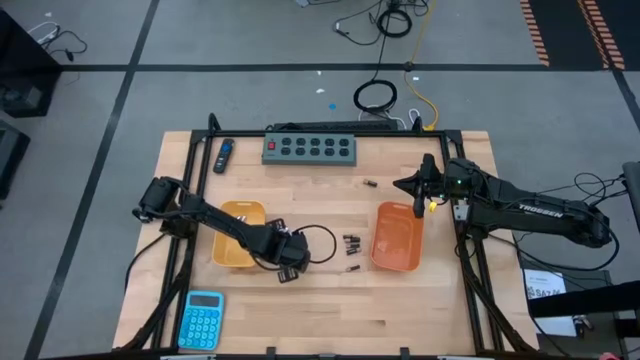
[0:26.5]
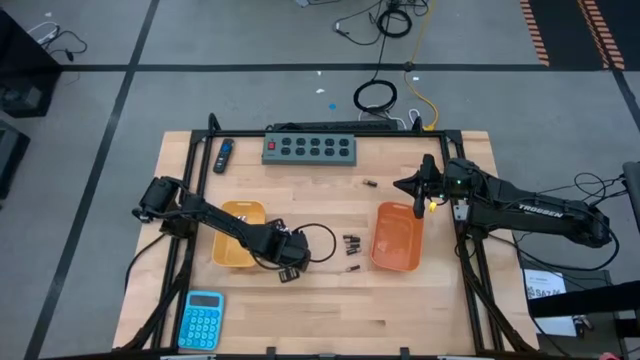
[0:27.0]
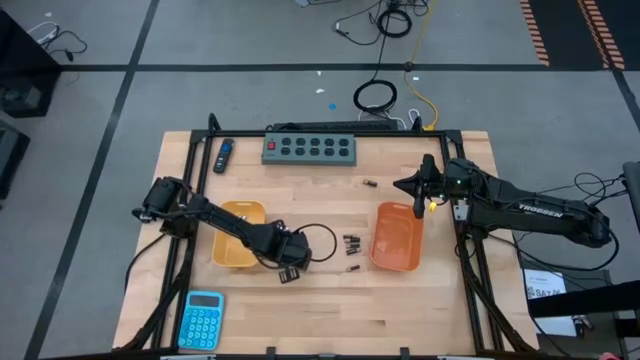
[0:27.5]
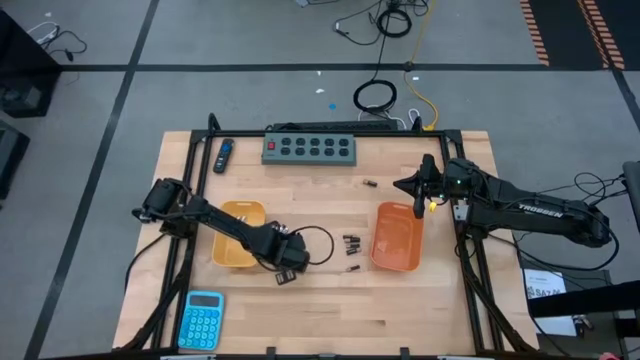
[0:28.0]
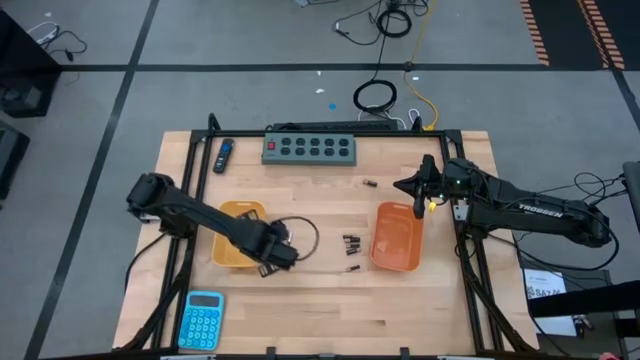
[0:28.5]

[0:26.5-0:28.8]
Task: Sort batteries
Put the silver battery into the yellow bin

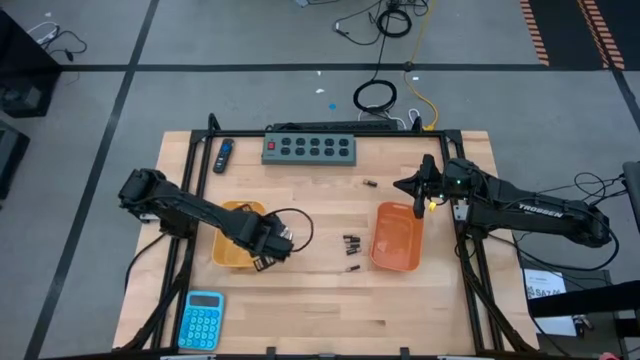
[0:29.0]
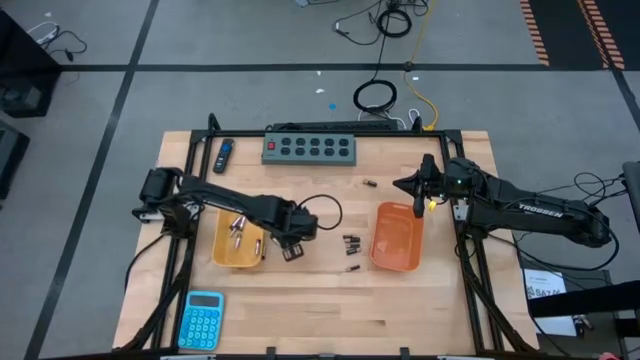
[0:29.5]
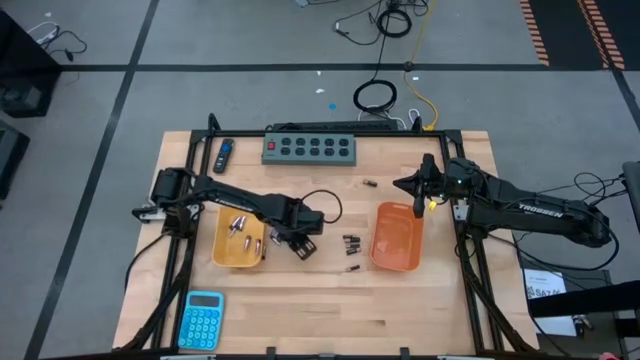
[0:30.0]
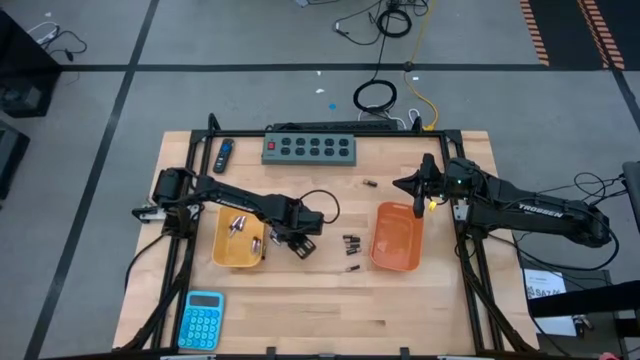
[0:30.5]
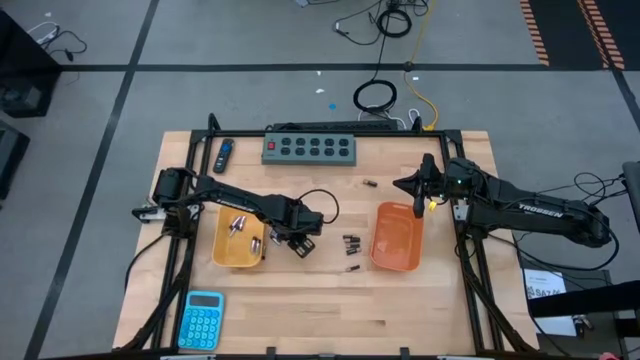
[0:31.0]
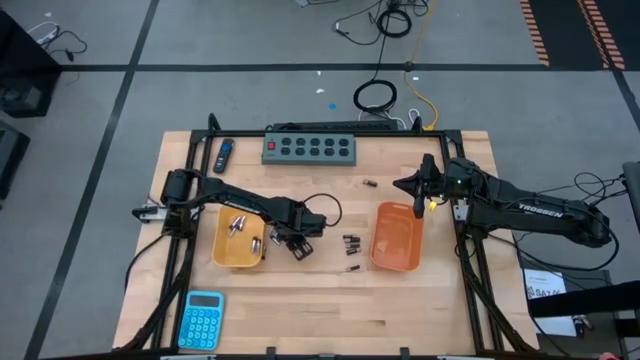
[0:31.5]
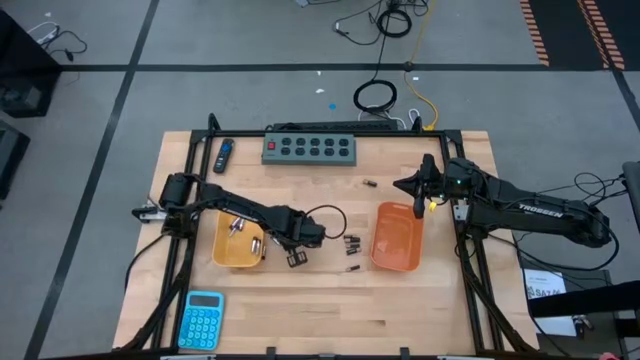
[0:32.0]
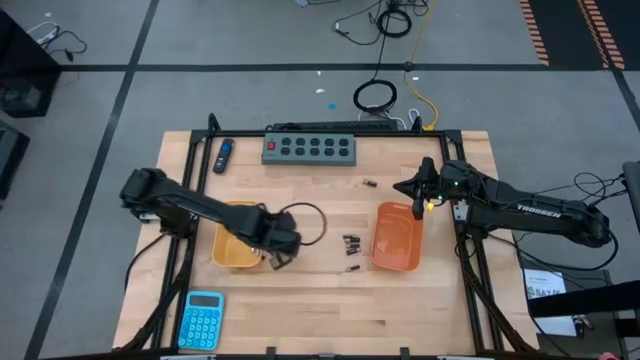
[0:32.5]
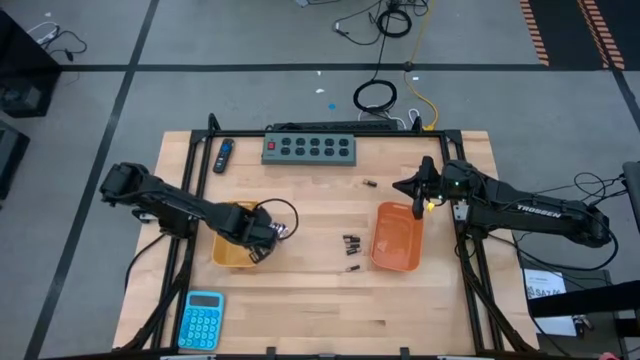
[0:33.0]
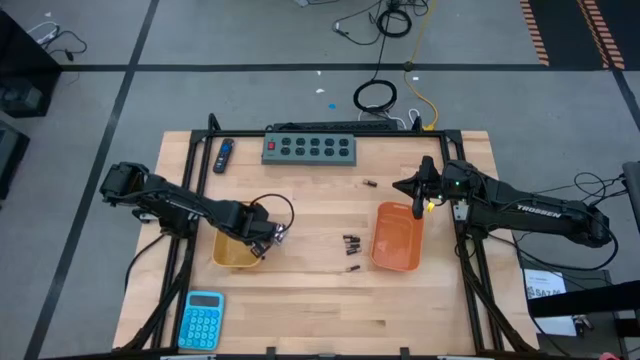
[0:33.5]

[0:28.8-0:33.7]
Put the silver battery into the yellow bin

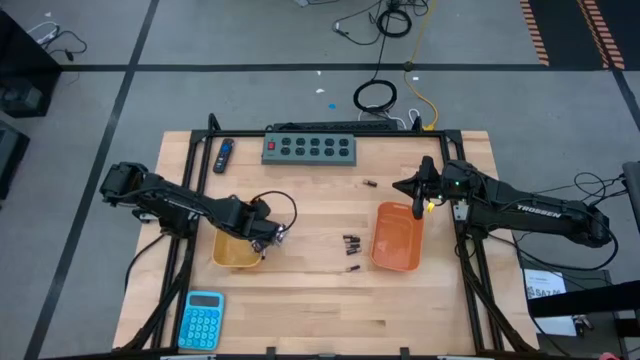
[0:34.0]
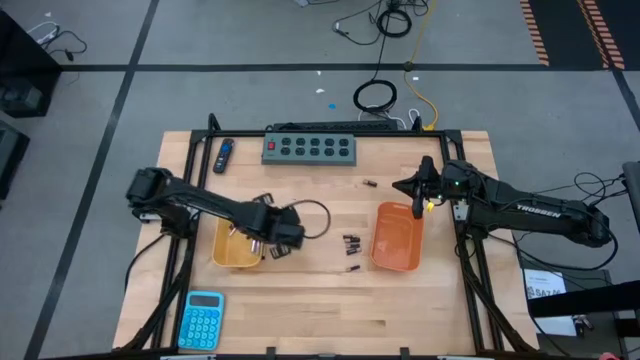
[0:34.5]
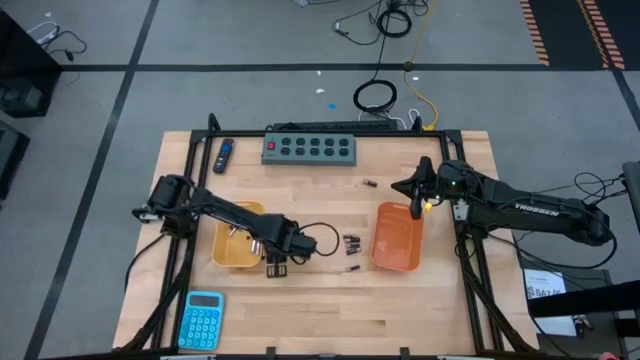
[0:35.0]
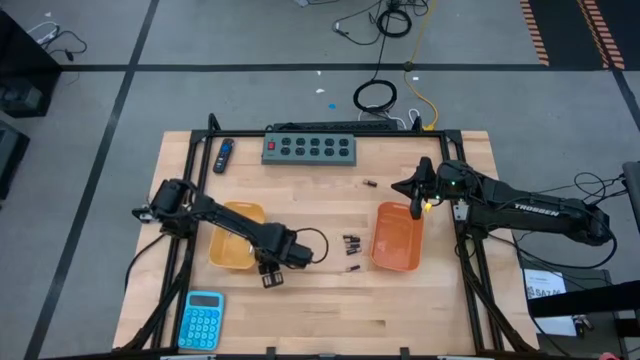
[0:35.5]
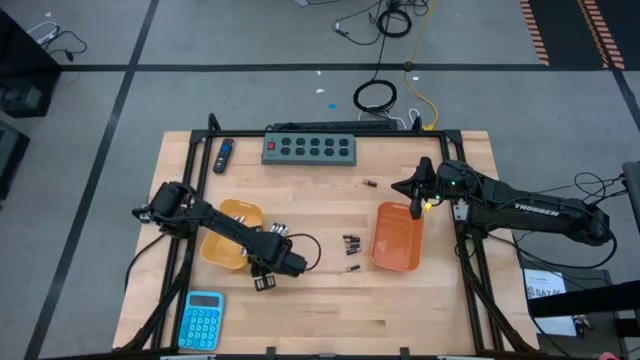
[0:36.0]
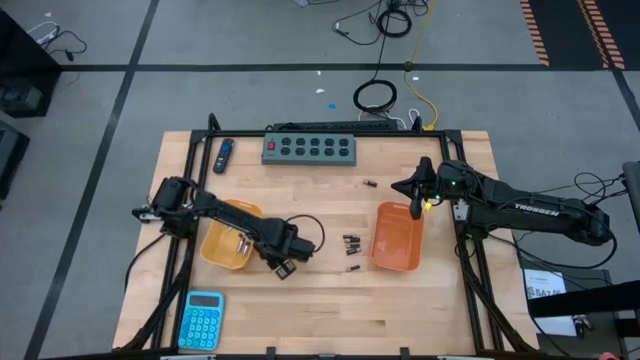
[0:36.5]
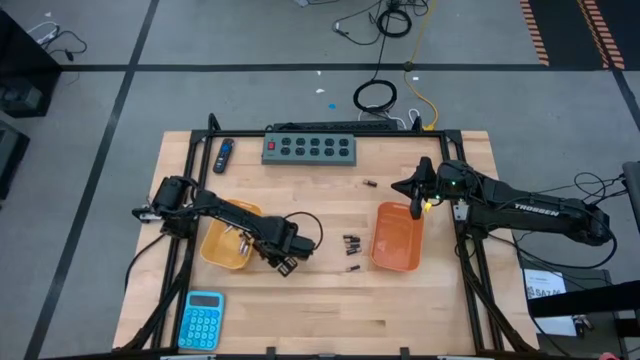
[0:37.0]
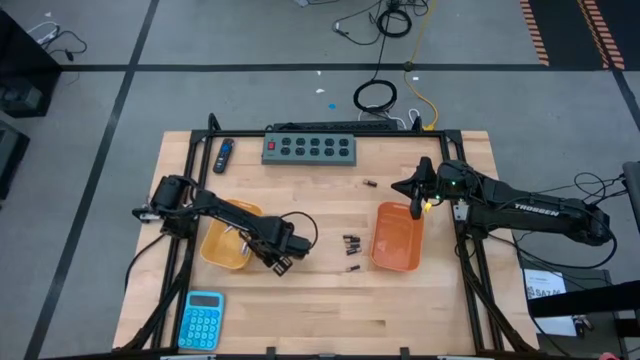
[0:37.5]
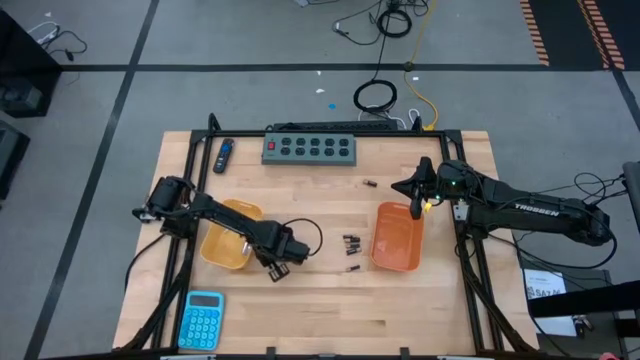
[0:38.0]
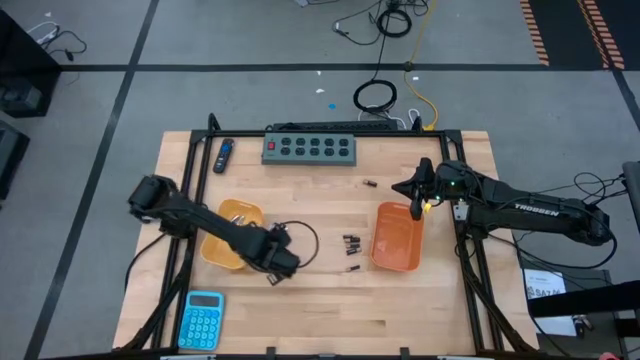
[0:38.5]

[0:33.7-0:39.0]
Put the silver battery into the yellow bin

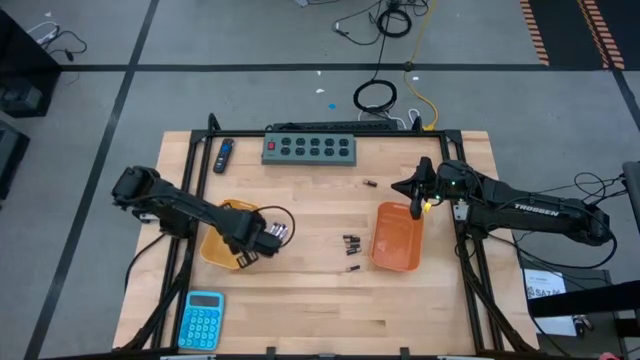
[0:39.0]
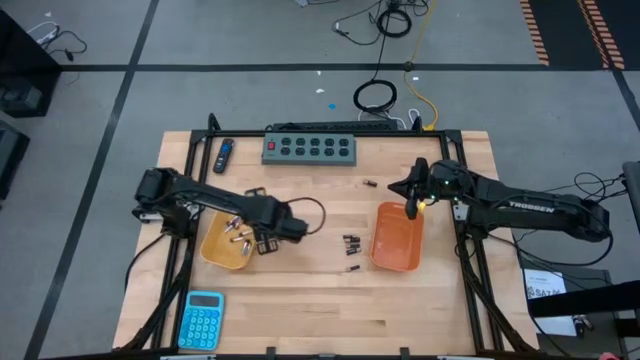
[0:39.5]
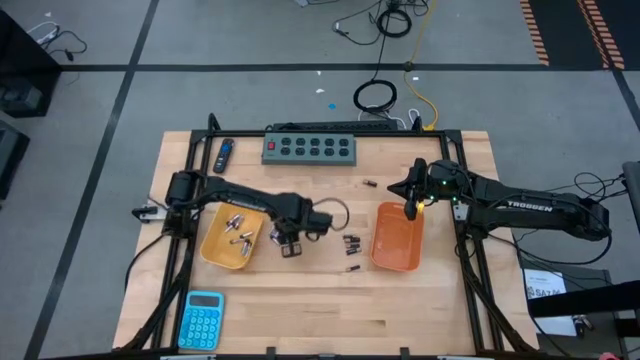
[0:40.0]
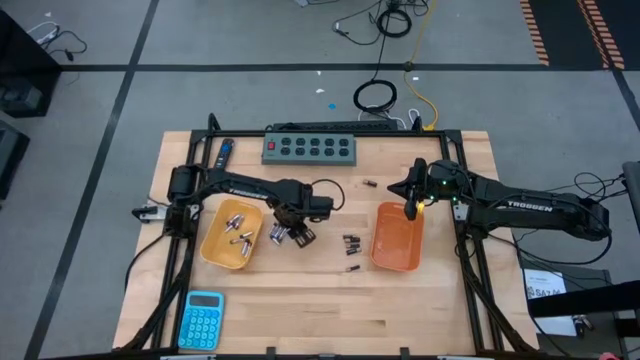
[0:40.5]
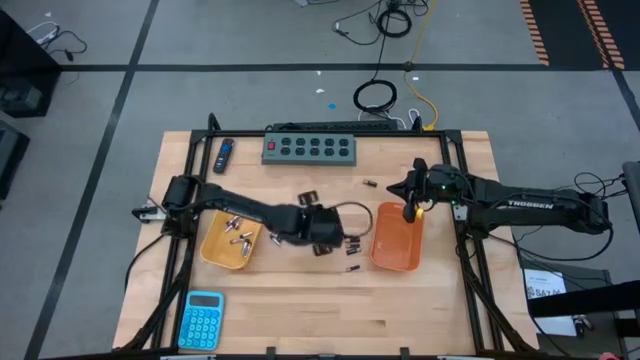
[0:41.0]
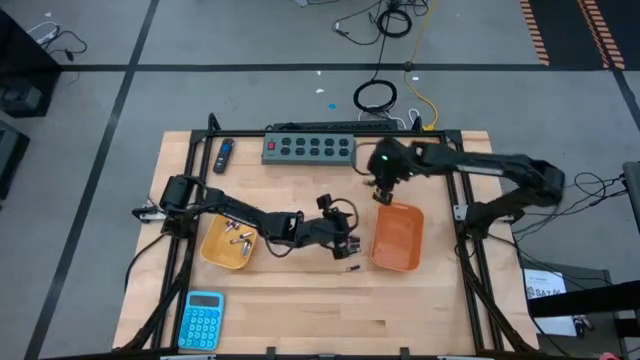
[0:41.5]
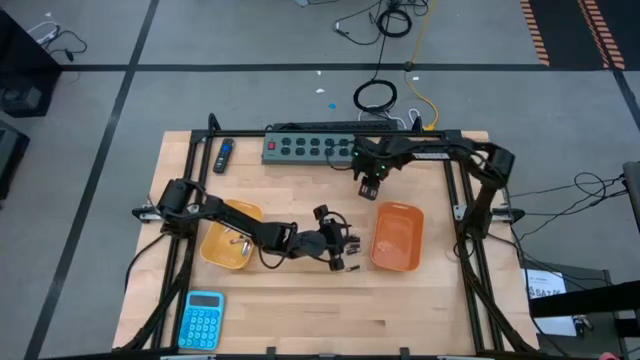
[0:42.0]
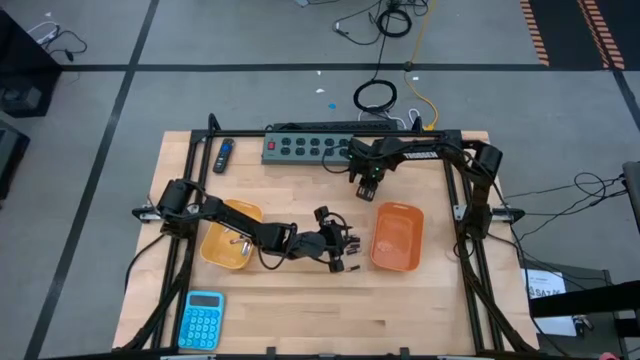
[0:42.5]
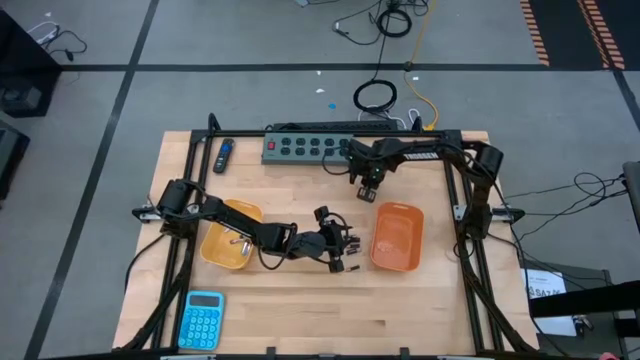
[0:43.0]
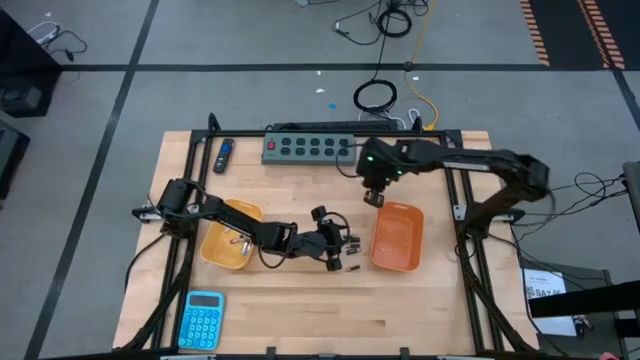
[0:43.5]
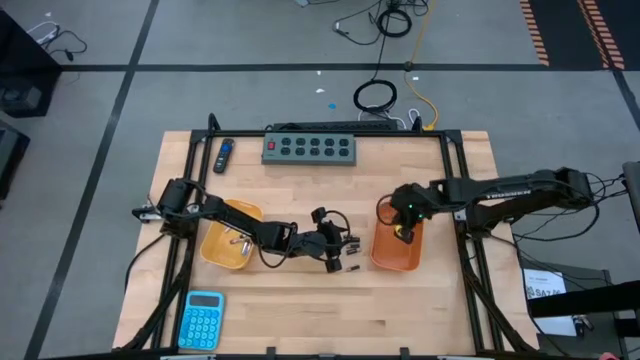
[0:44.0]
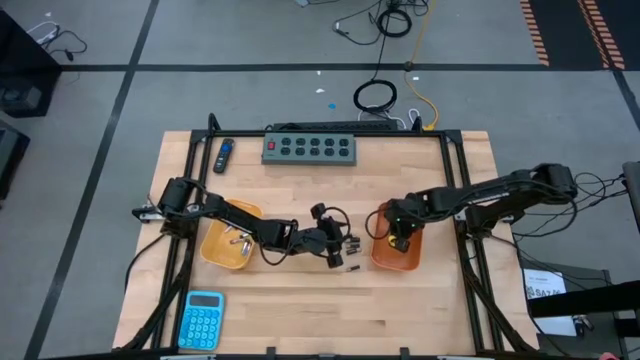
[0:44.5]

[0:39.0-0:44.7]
Put the black battery into the orange bin

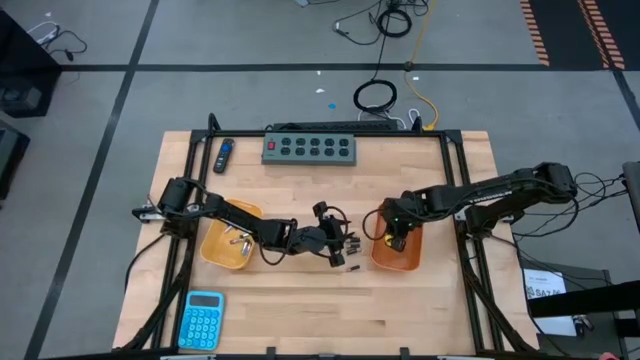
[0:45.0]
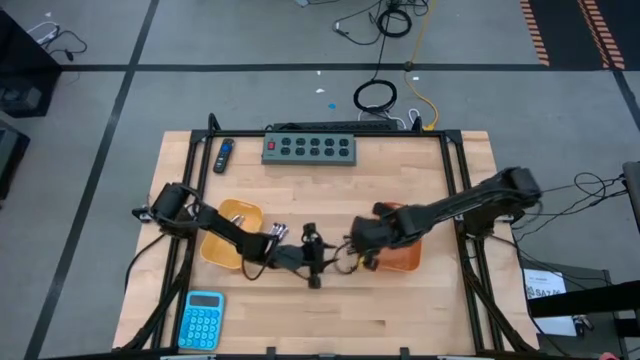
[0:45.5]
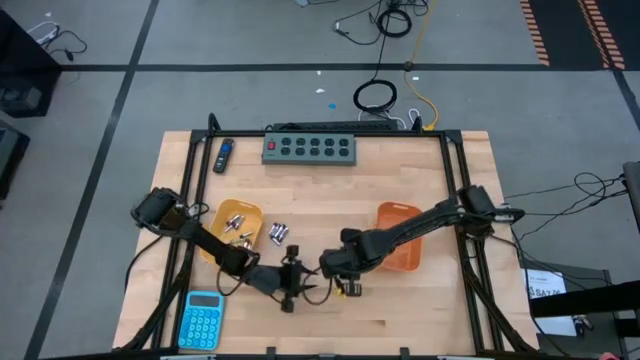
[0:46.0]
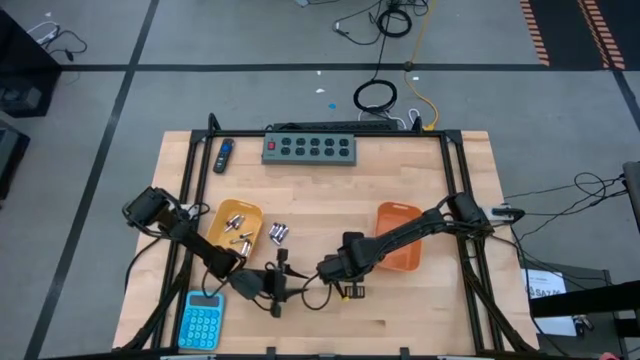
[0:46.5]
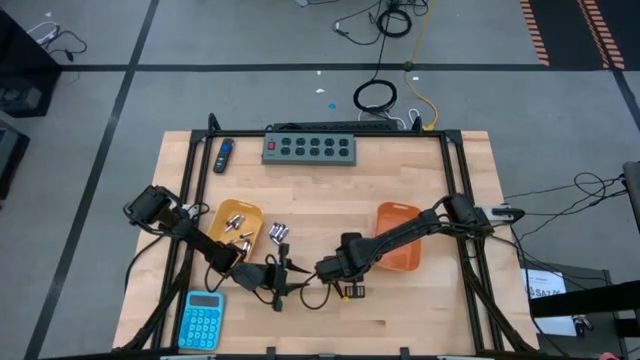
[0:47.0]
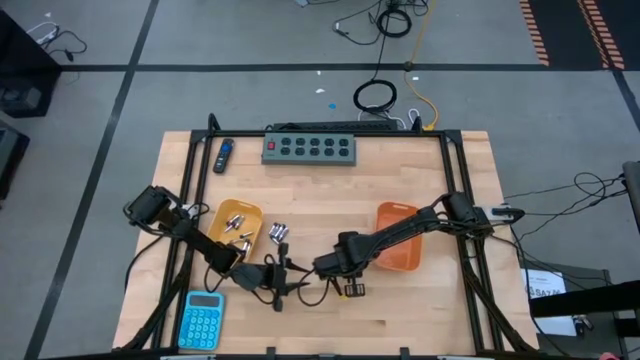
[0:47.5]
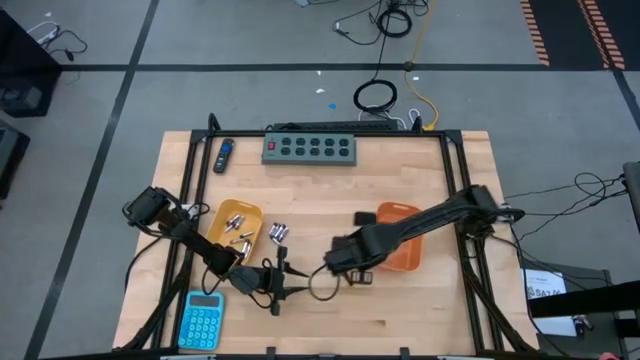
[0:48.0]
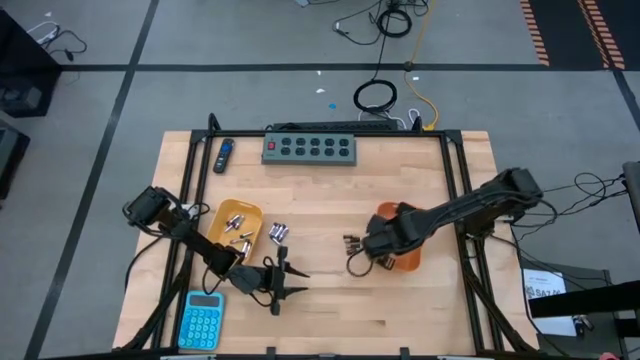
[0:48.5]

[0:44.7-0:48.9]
Put the black battery into the orange bin
